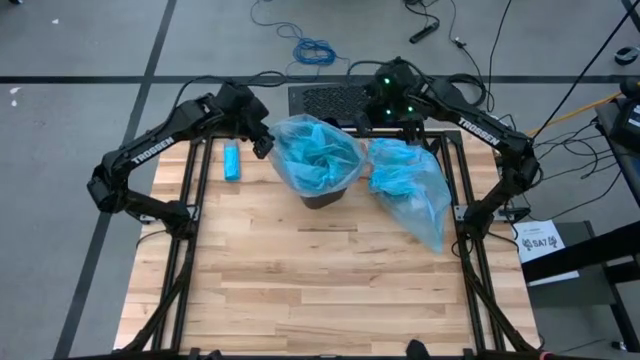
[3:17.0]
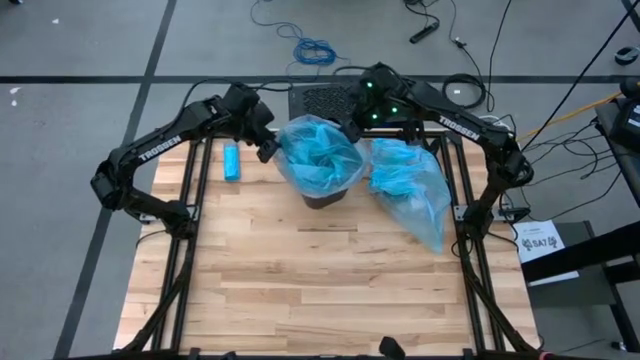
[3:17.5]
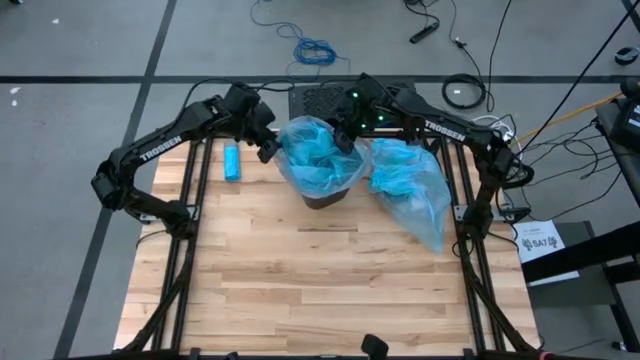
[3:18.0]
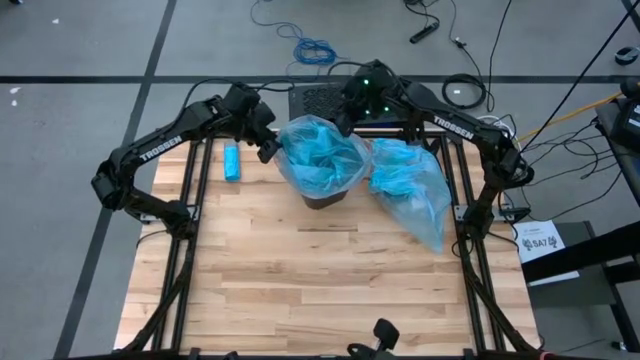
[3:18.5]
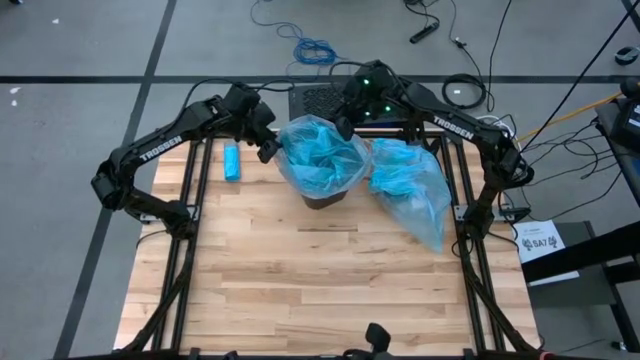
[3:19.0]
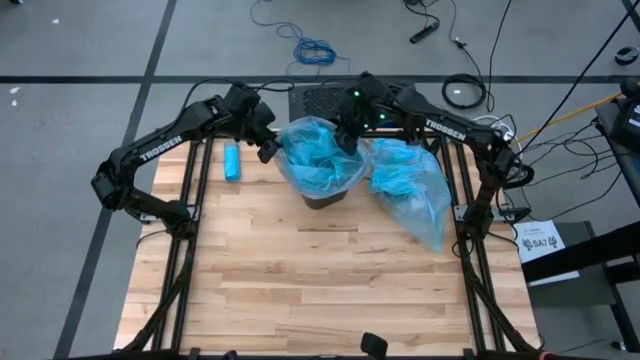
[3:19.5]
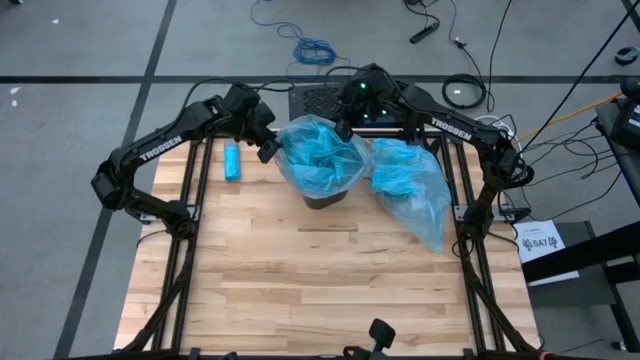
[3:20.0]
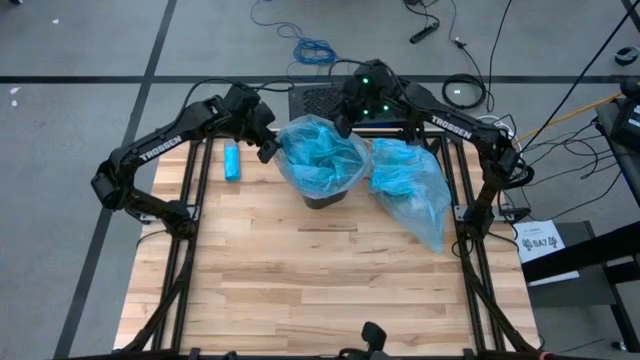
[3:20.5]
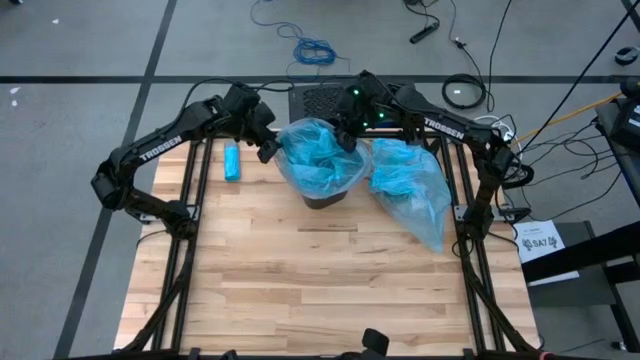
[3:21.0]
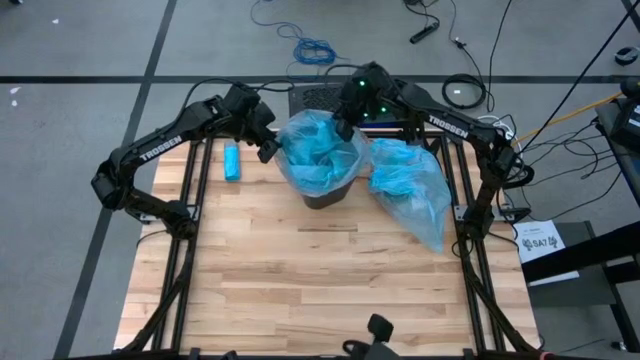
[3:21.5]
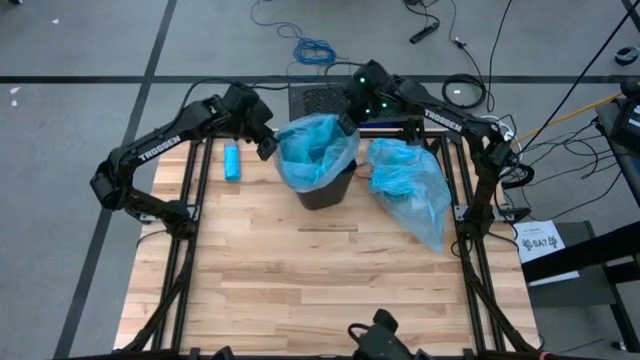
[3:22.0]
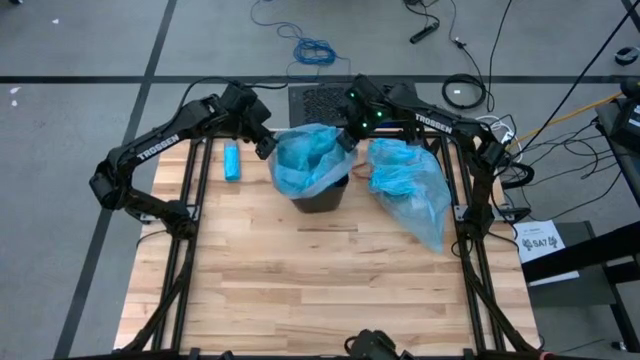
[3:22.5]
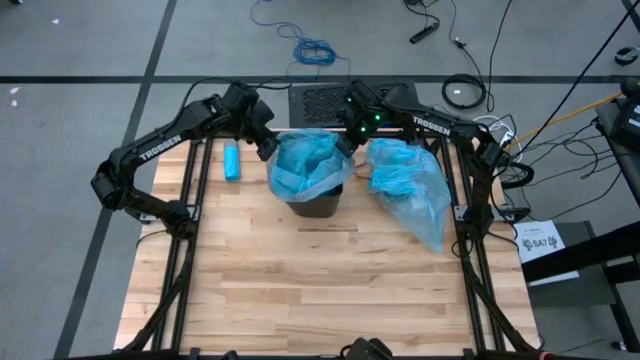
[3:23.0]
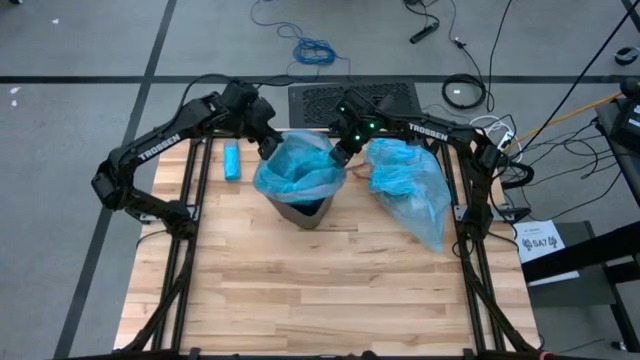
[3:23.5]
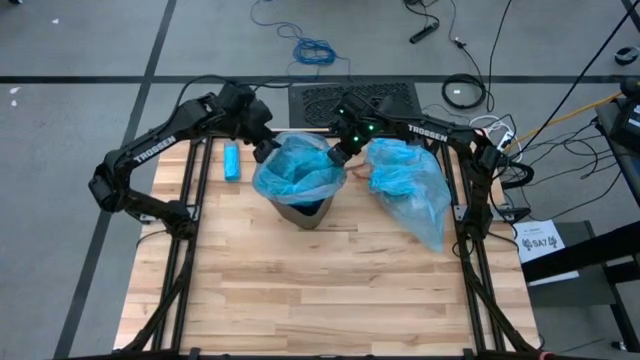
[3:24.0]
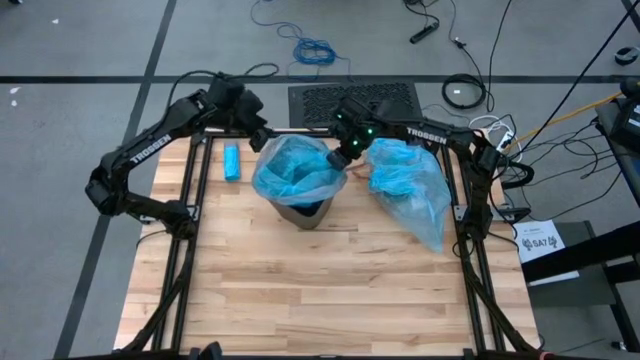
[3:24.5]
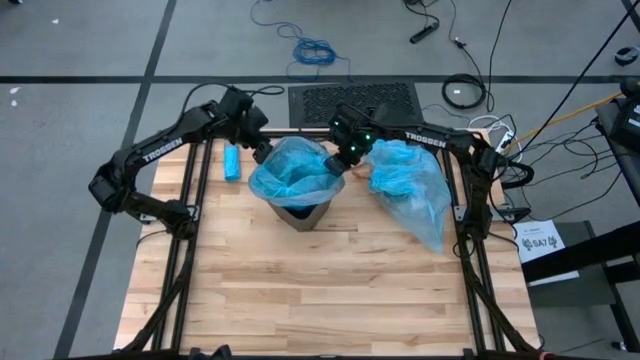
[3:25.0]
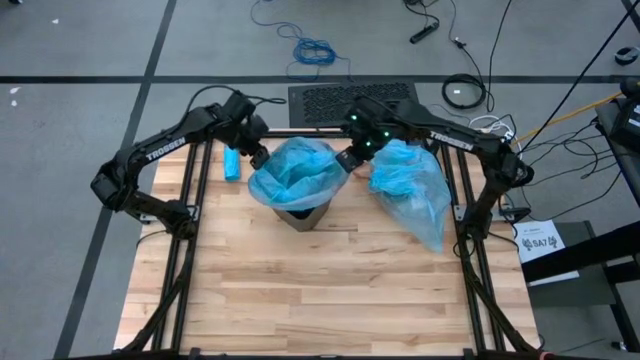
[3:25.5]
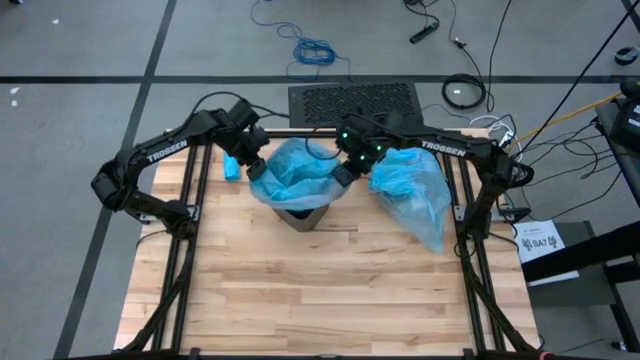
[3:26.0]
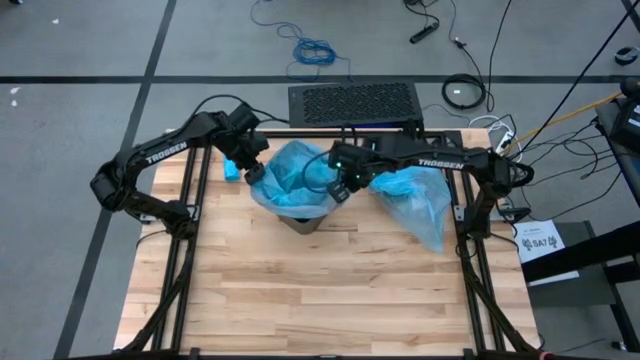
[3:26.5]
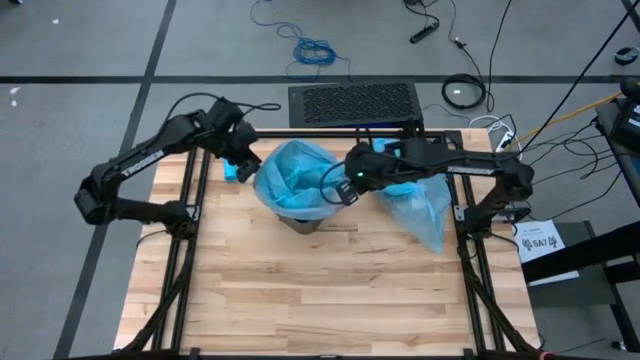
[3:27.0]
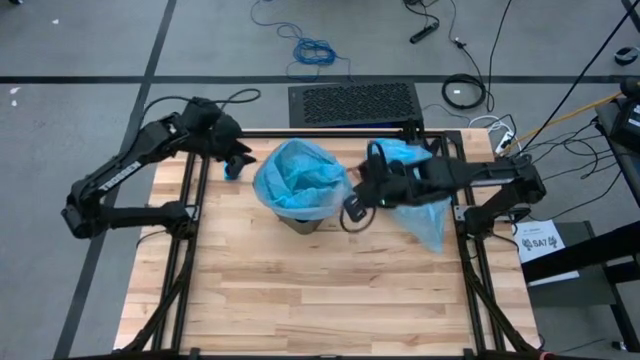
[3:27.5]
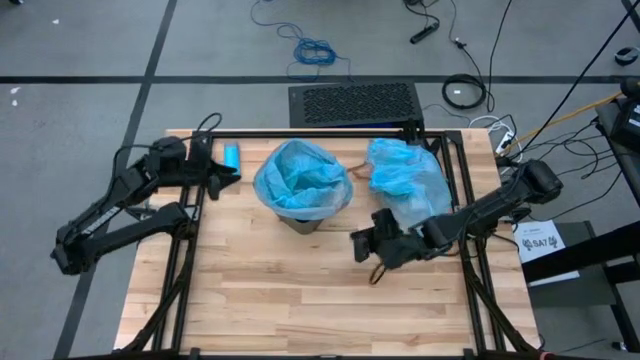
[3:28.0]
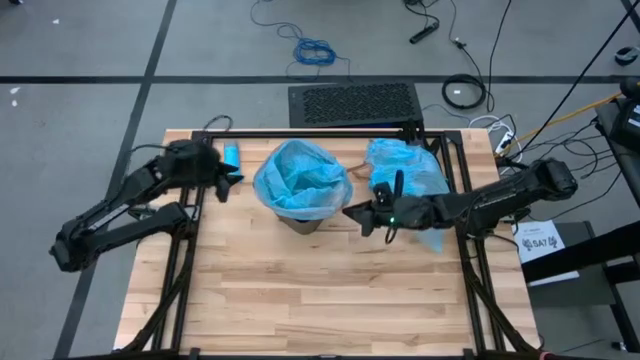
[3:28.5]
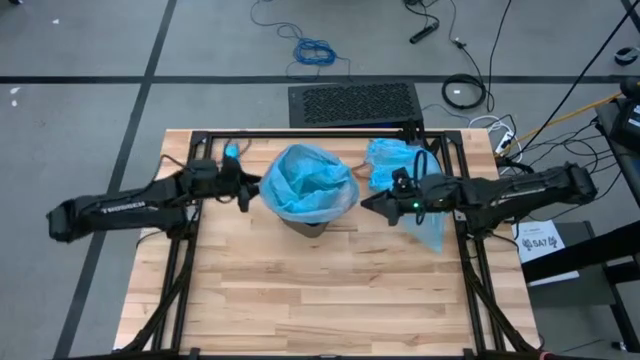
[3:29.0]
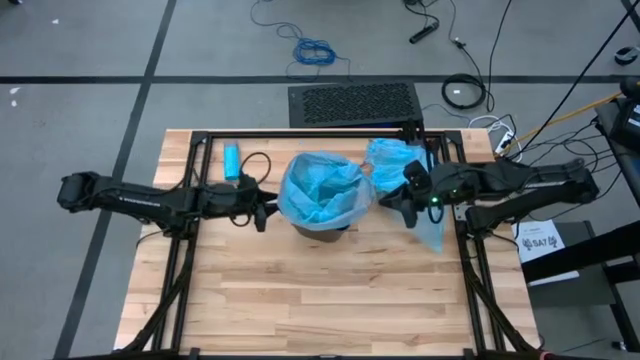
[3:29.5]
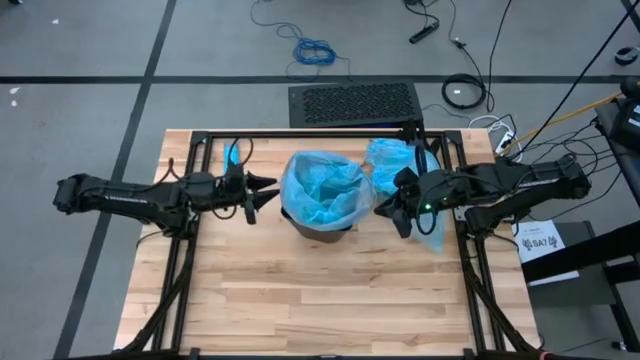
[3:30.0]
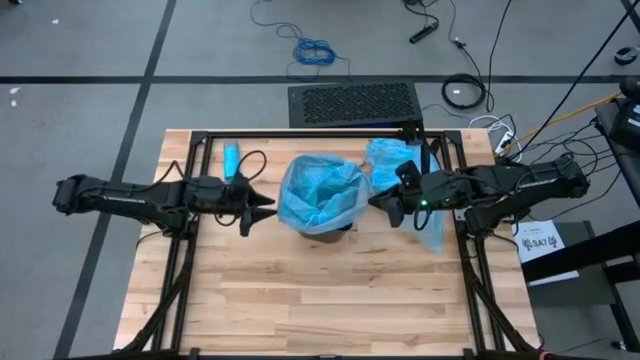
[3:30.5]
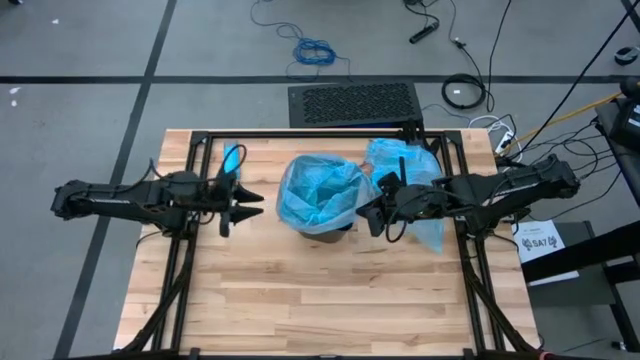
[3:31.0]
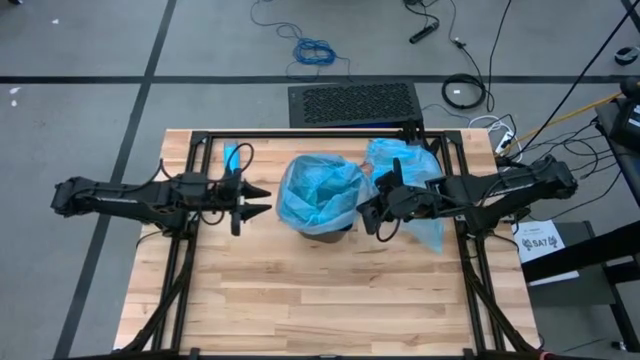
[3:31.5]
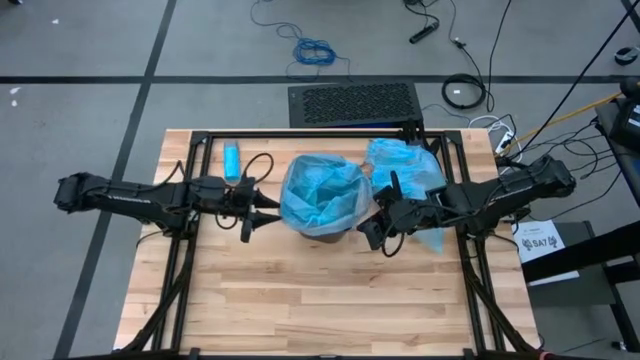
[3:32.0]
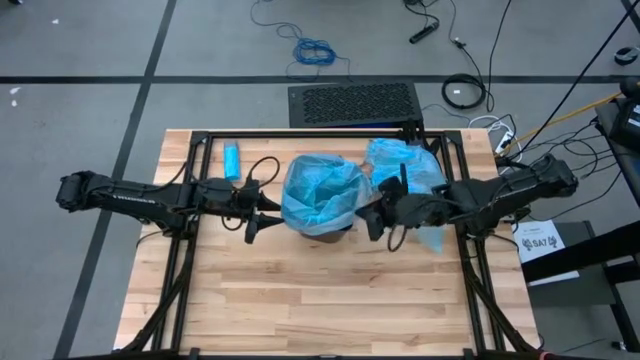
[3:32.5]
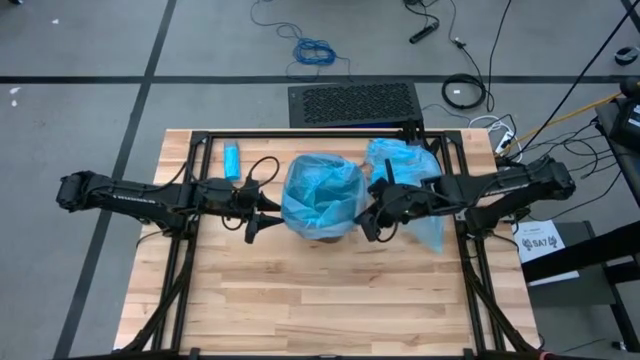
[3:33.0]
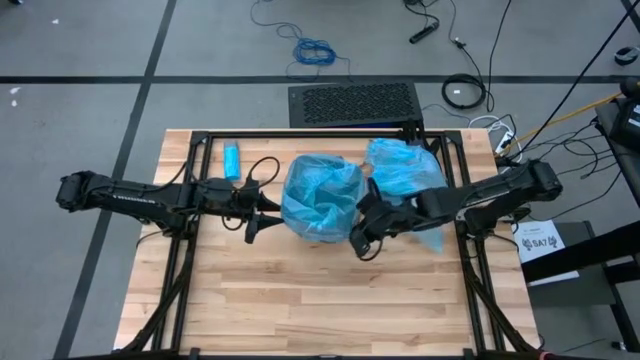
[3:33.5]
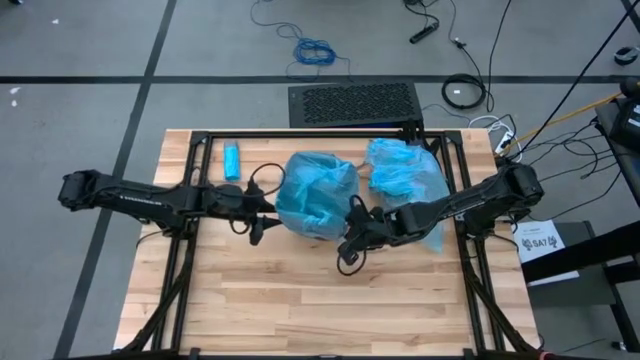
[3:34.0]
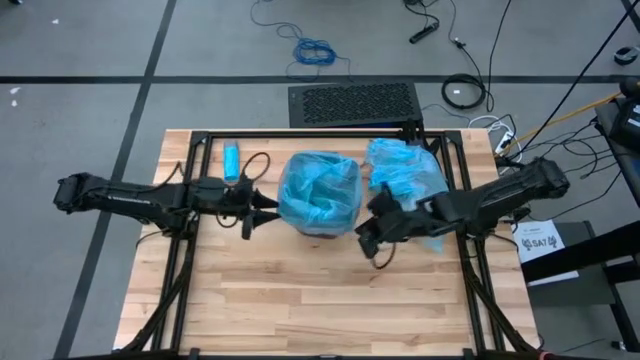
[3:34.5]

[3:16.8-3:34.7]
Task: place trash/remove bag and relplace
Insert the blue trash bag into the trash bin

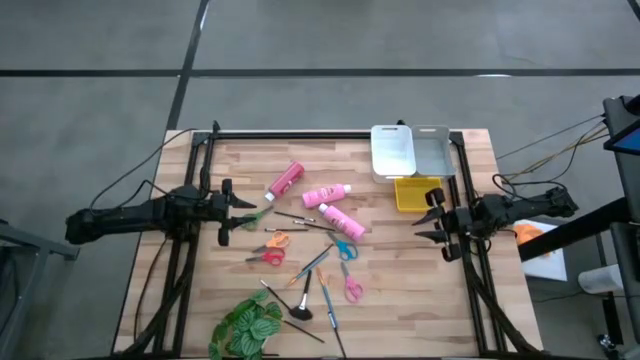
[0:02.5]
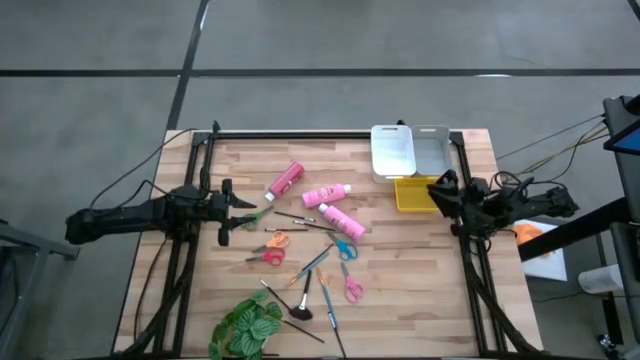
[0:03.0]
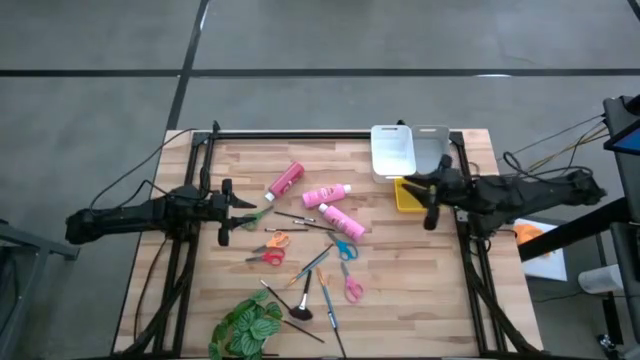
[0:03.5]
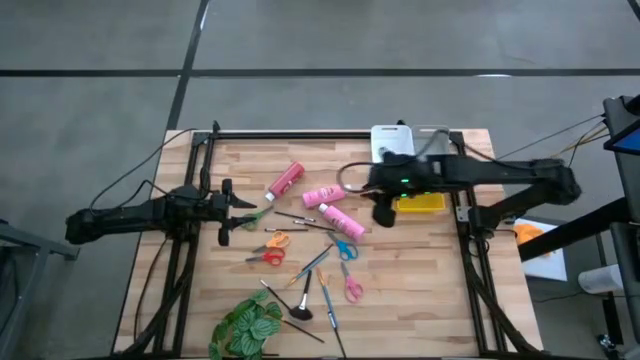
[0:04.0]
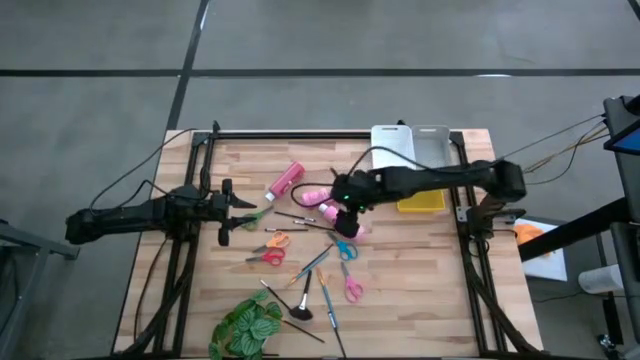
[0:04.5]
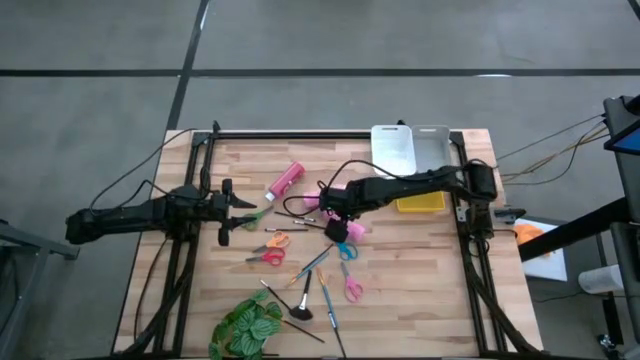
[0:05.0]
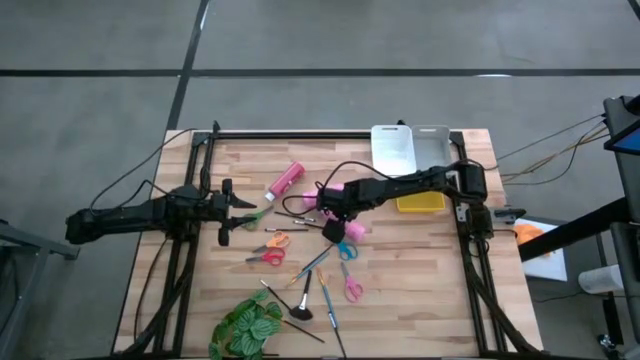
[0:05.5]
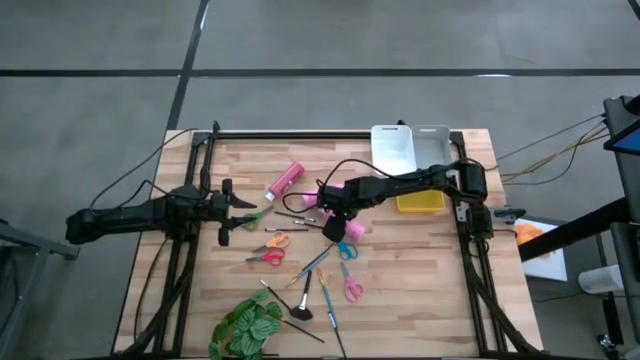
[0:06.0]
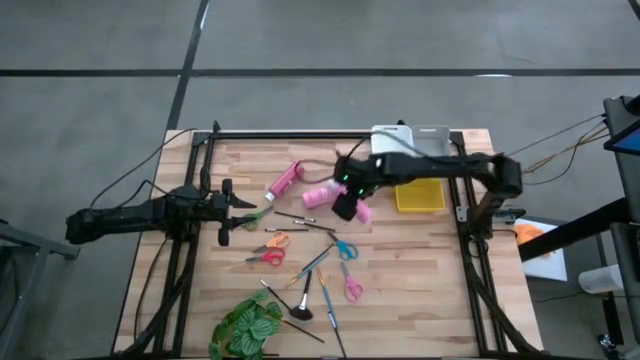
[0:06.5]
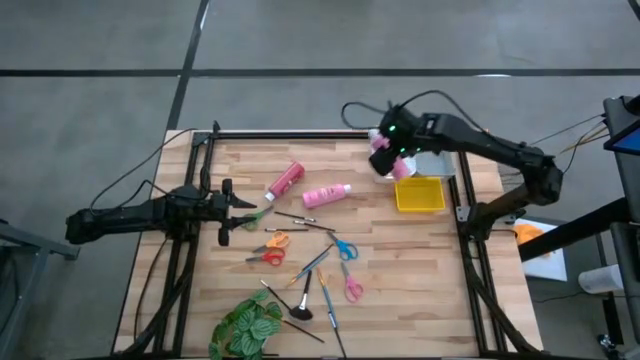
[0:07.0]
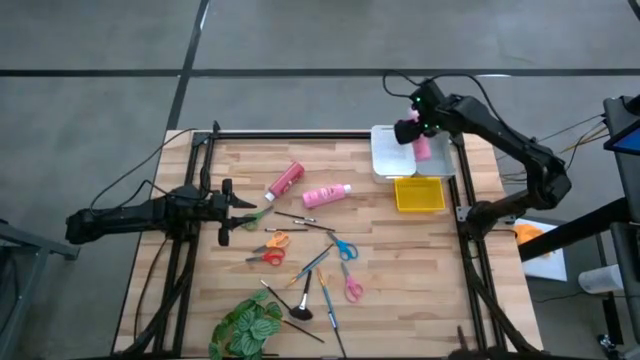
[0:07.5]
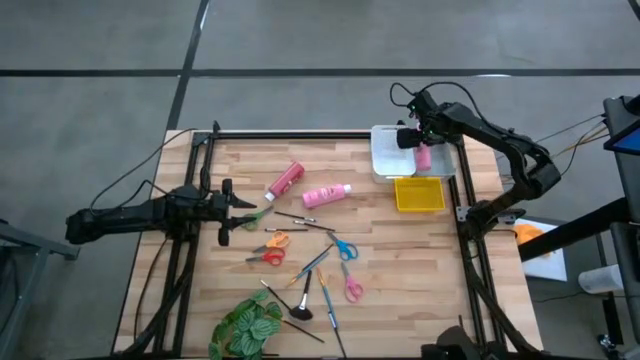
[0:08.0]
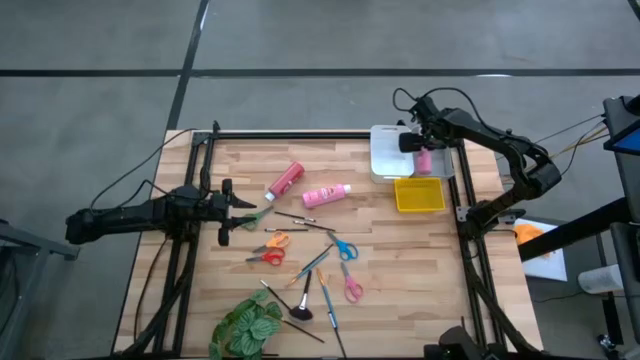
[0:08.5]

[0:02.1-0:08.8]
Task: Pick & Place Paint Supplies
Put the pink paint bottle into the gray bin
